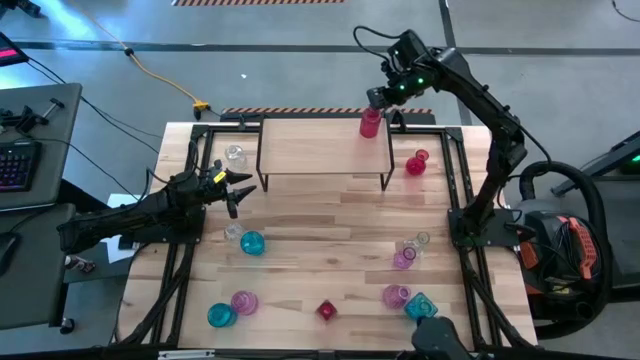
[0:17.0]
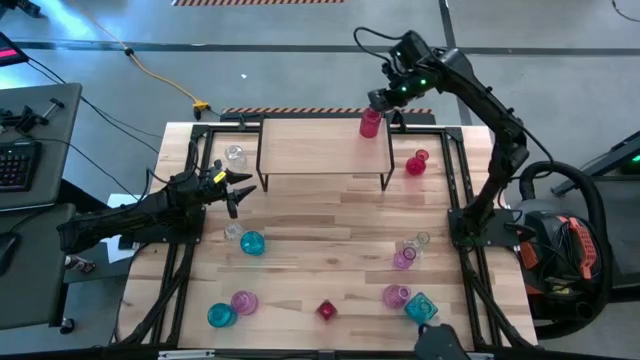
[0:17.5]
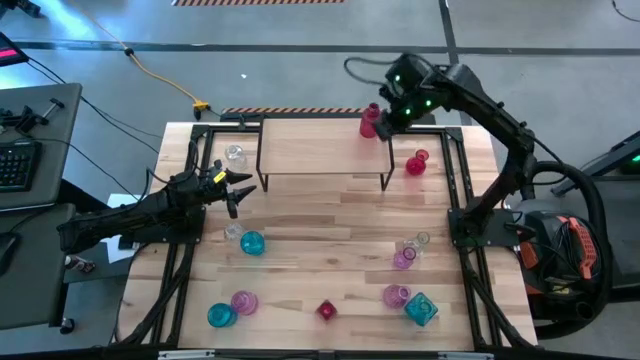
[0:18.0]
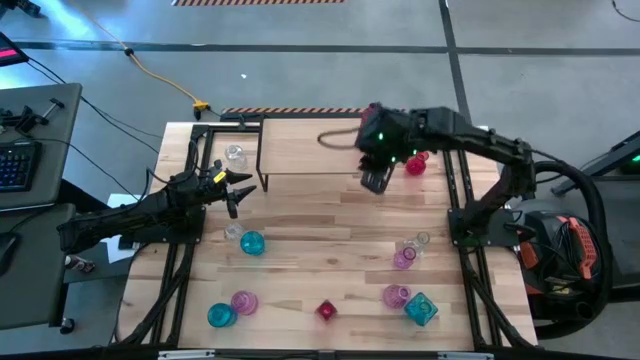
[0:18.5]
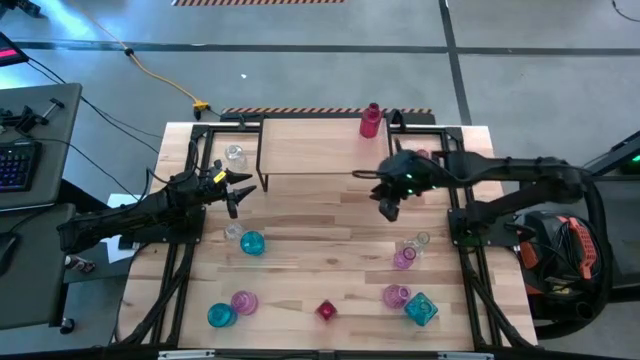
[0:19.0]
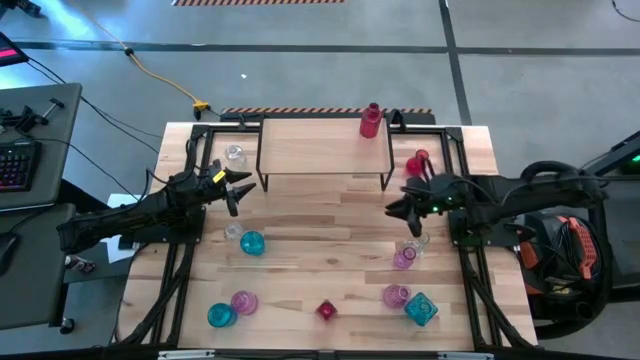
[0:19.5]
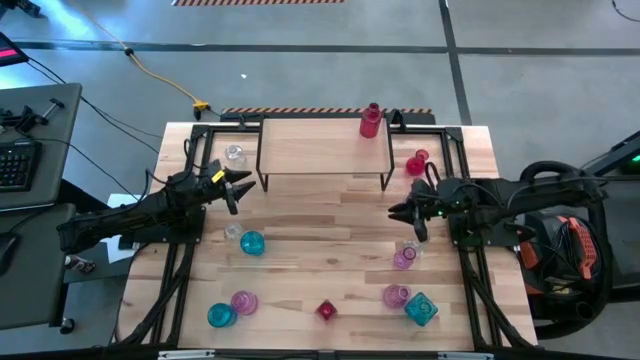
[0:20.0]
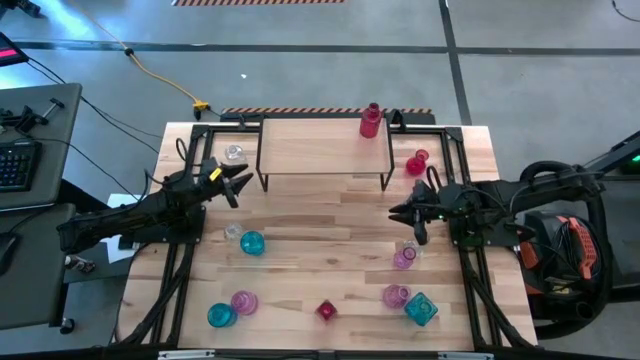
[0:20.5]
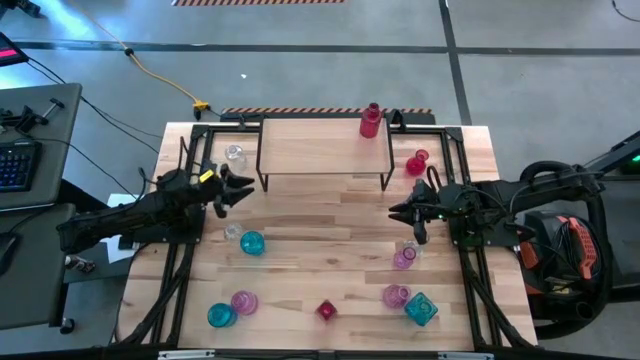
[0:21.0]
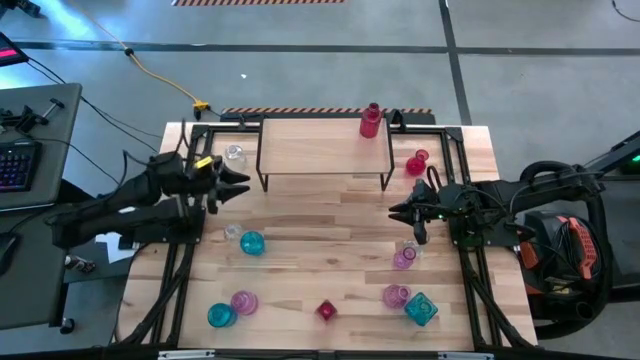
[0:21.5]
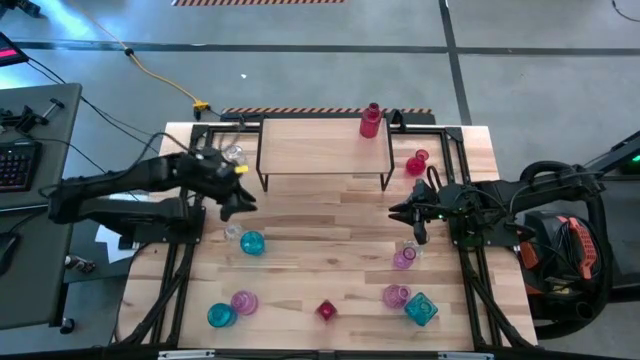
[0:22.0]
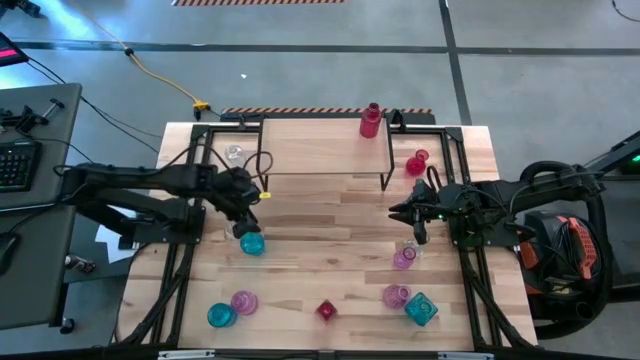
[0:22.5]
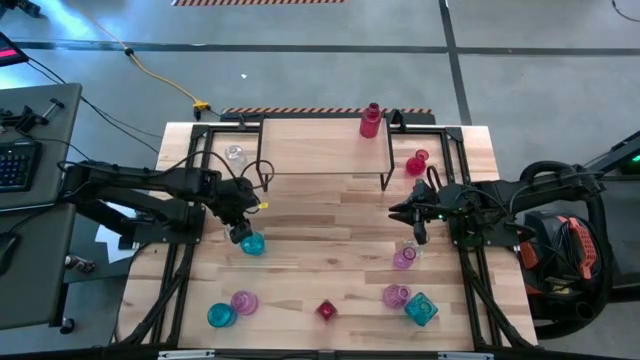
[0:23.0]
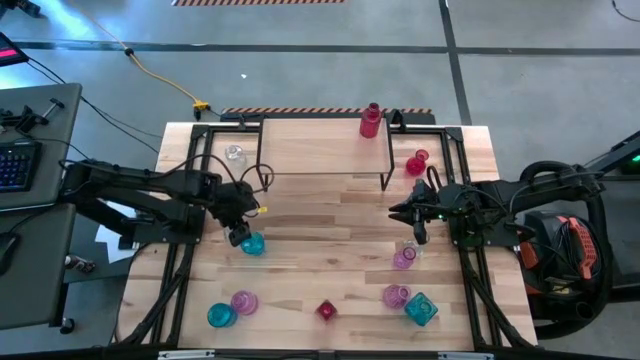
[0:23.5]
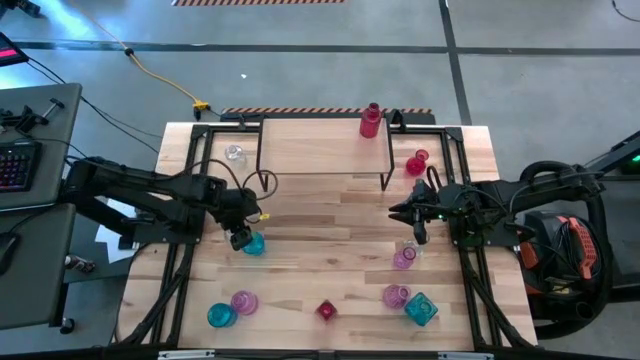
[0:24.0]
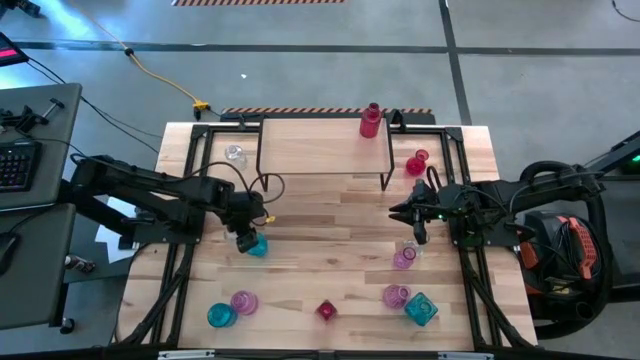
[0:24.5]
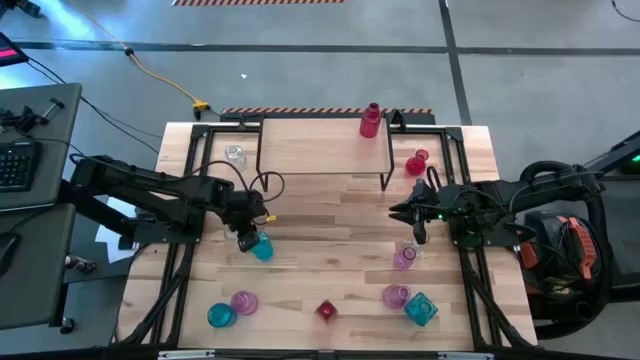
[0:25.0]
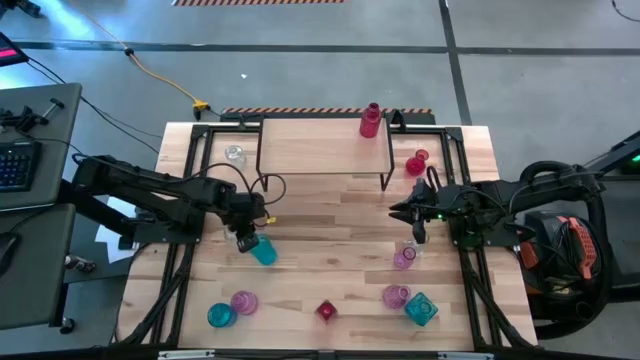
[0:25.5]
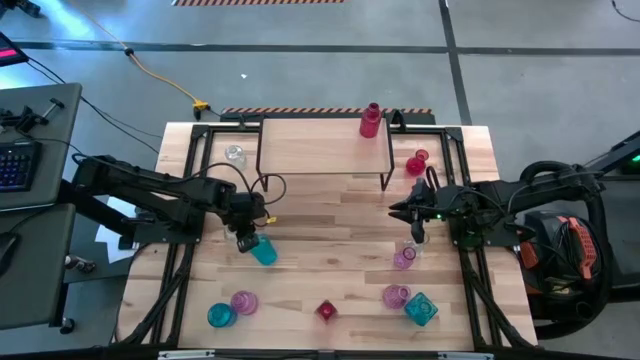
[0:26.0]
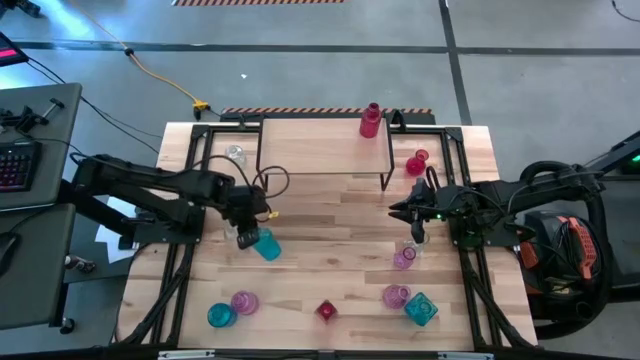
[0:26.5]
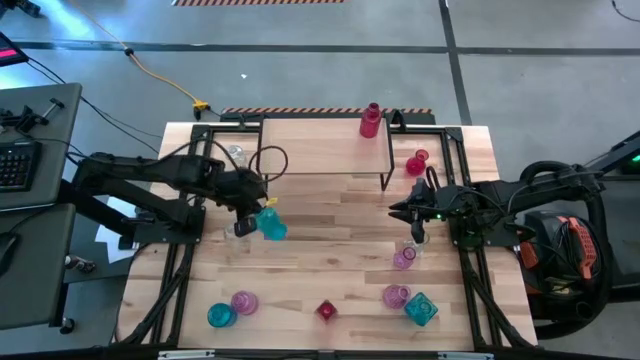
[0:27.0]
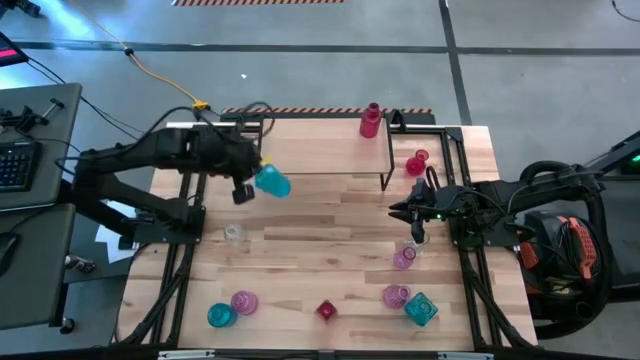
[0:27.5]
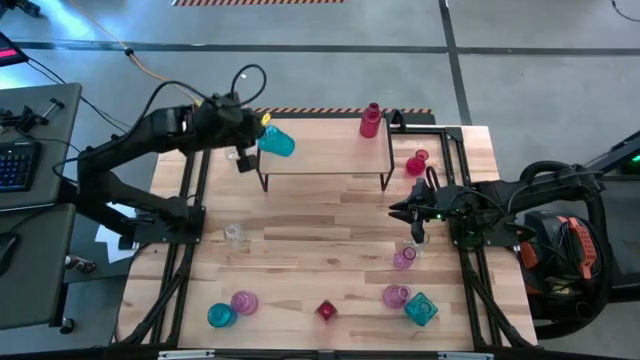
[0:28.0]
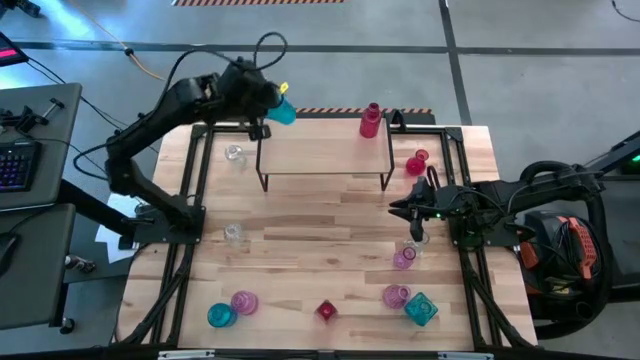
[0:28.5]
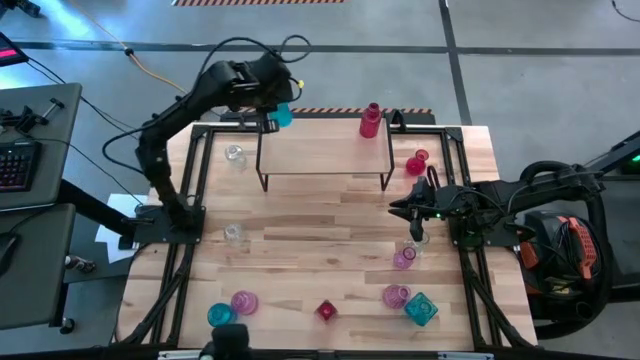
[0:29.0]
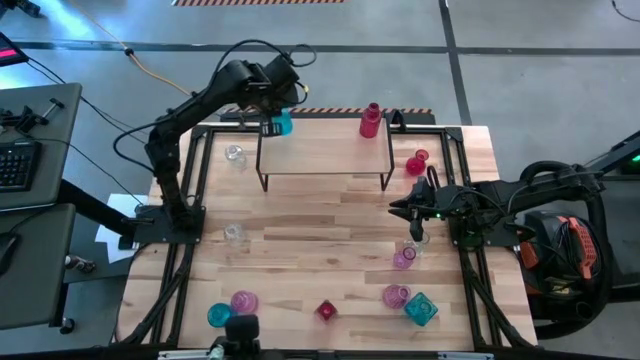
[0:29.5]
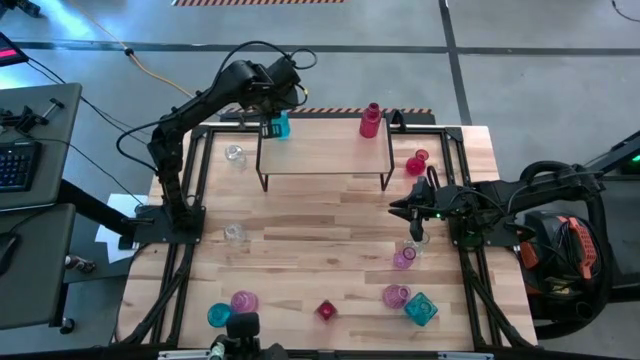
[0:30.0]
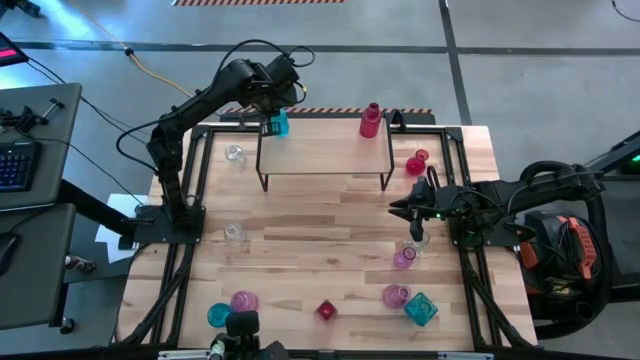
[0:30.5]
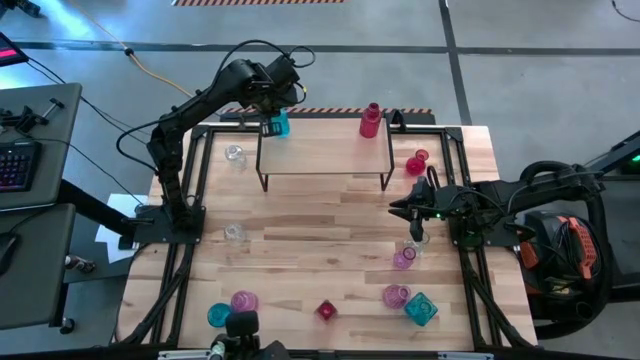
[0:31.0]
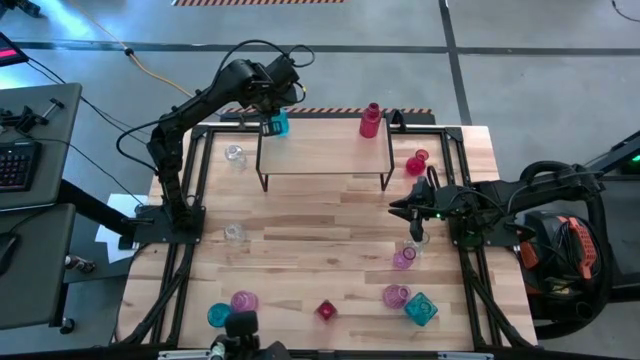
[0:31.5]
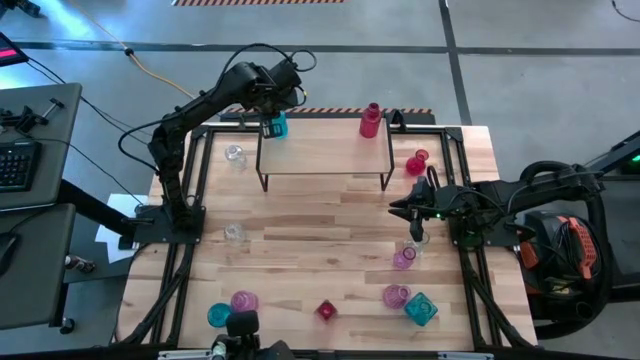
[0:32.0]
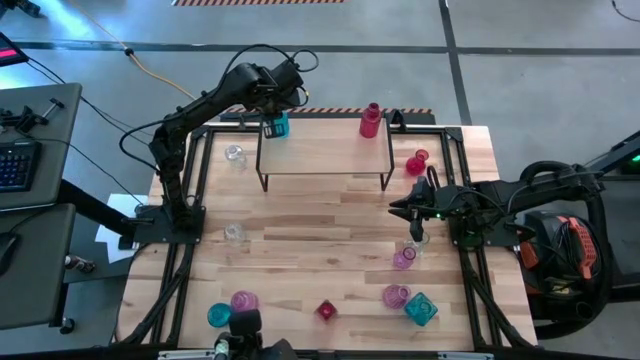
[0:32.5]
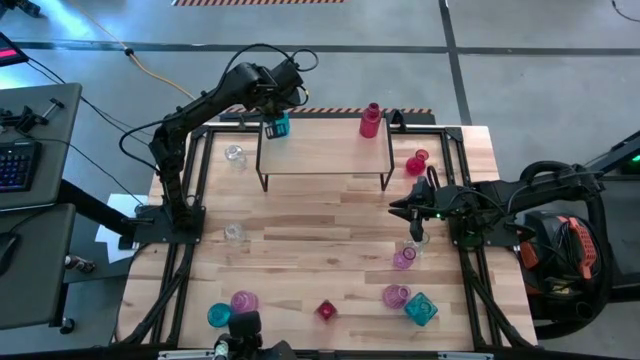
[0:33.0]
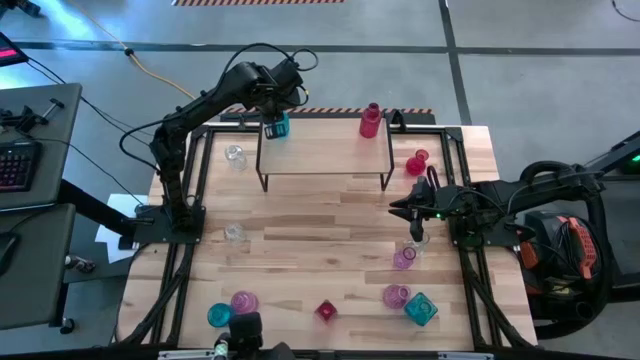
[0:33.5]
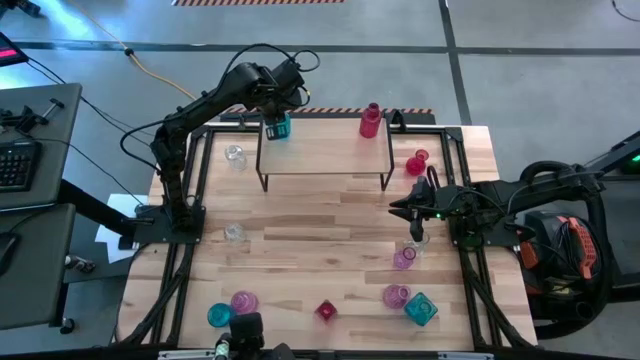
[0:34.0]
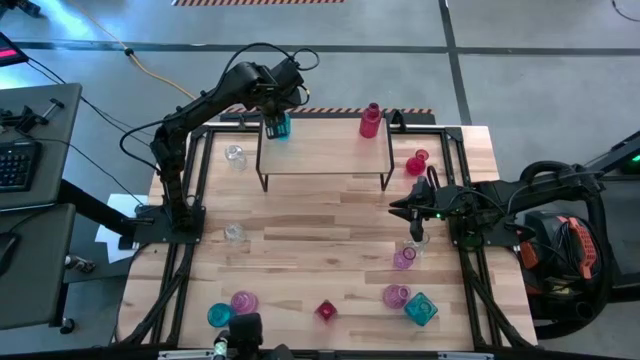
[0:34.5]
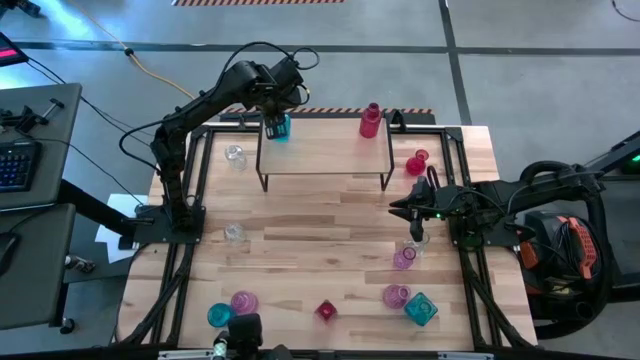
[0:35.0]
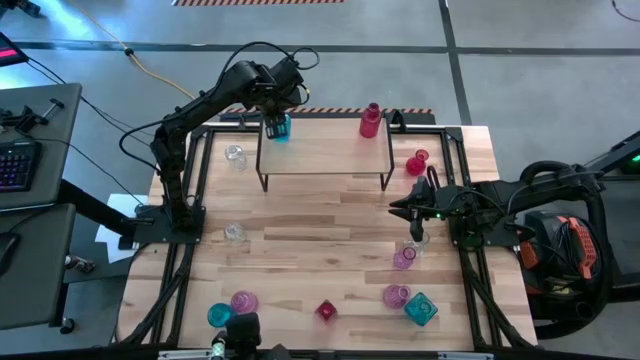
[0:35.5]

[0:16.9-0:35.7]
Task: sort vases onto shelf
Put the top left blue vase on the shelf

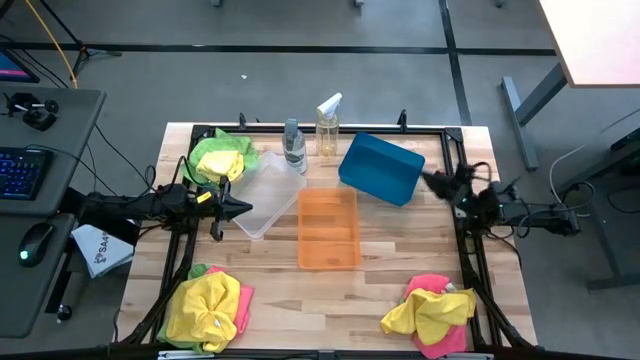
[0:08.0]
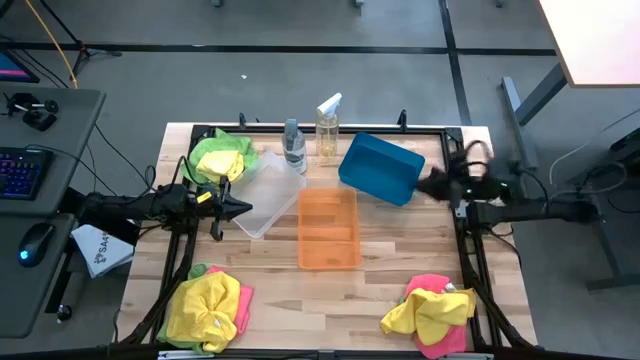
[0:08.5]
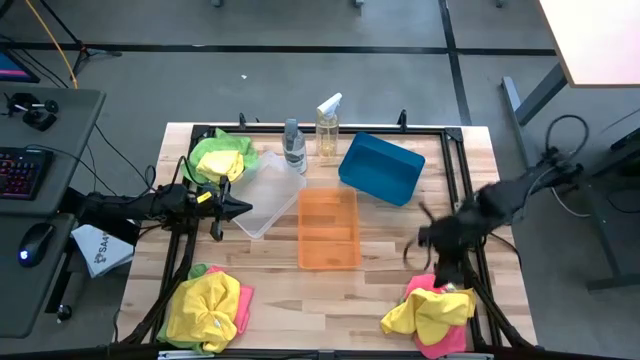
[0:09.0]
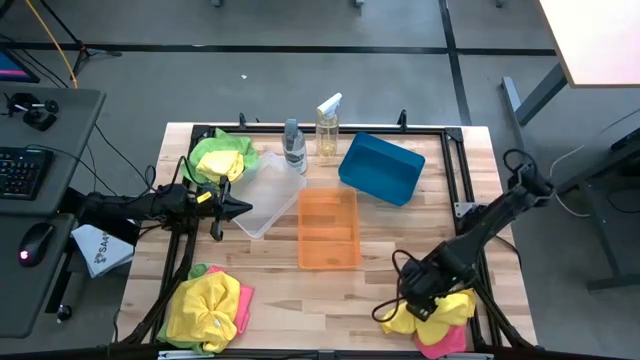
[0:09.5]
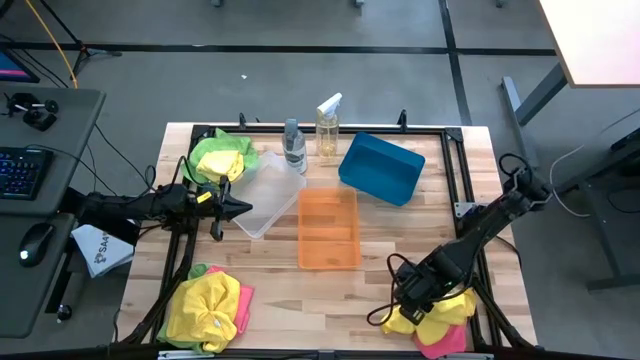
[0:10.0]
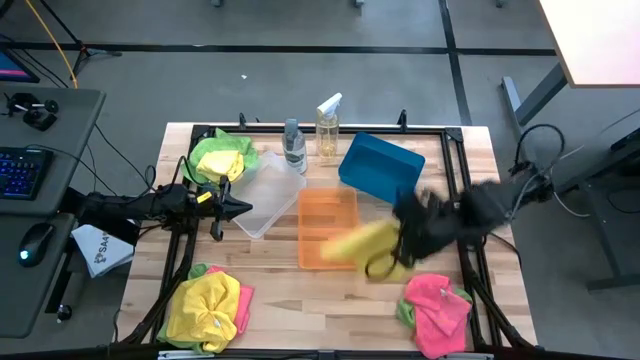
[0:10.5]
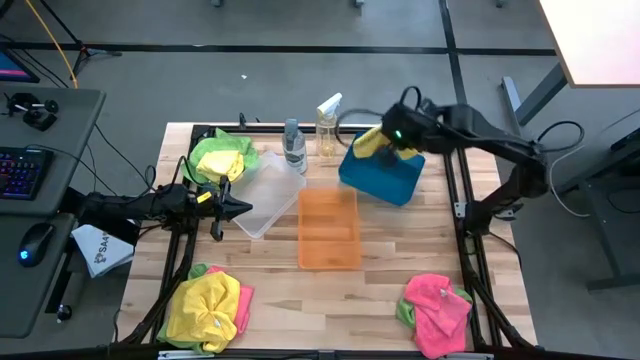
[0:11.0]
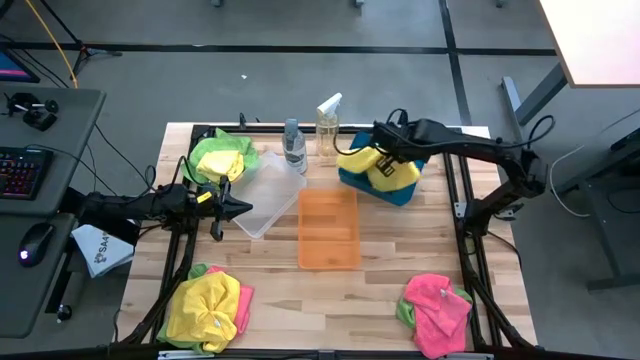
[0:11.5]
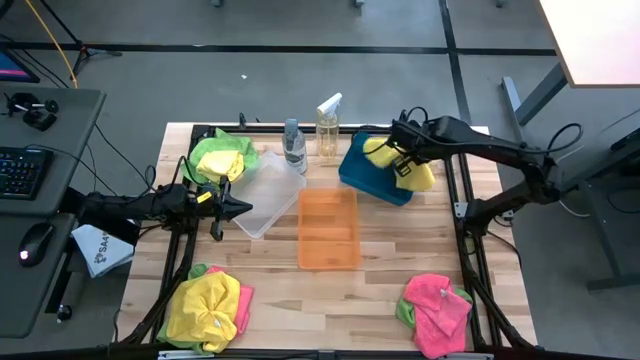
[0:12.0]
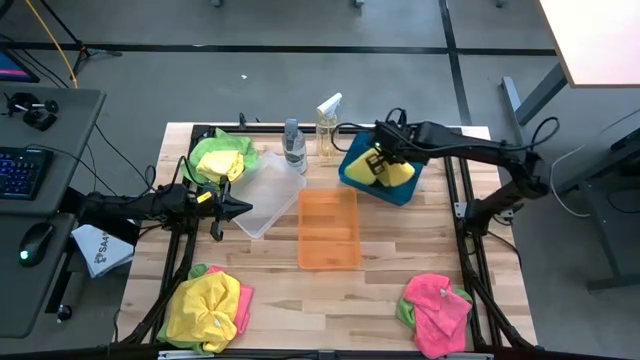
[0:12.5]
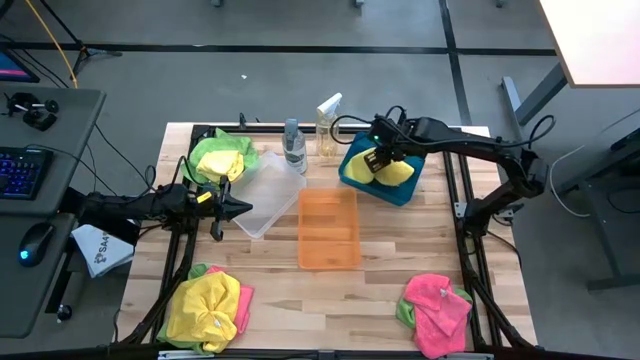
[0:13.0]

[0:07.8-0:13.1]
Task: Sort microfiber towel by color & place in baskets
Put the bottom right yellow towel into the blue bin
